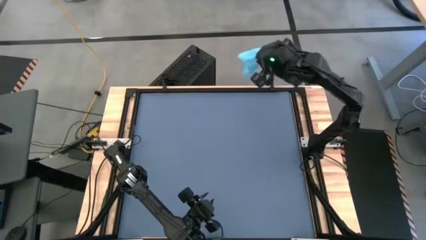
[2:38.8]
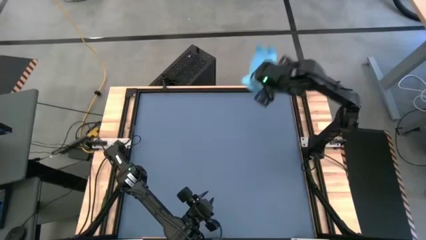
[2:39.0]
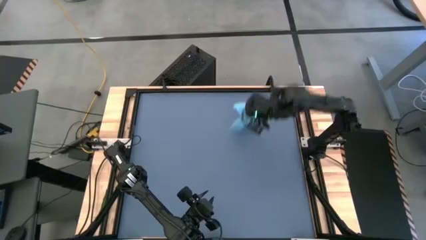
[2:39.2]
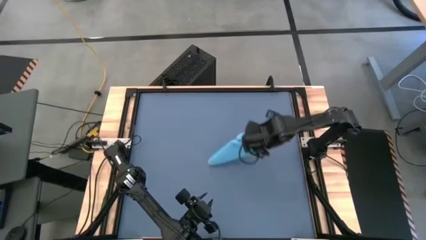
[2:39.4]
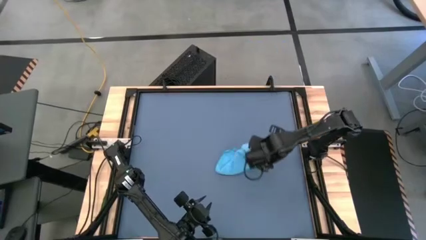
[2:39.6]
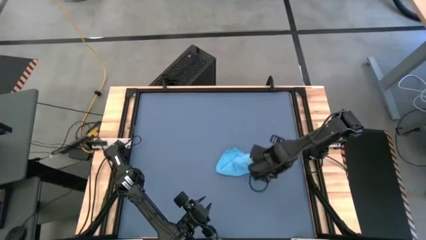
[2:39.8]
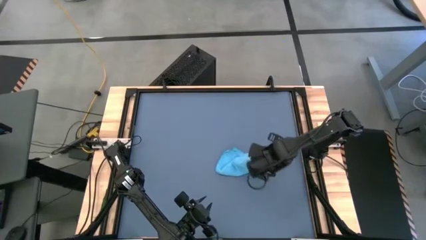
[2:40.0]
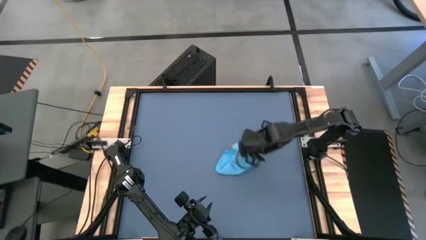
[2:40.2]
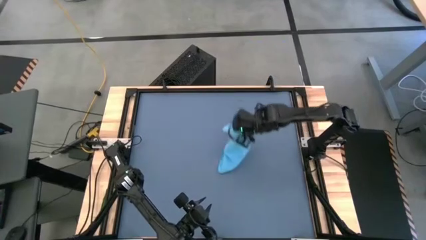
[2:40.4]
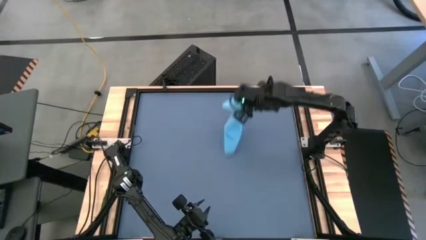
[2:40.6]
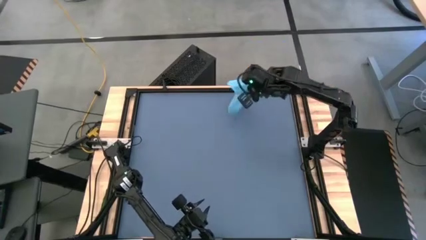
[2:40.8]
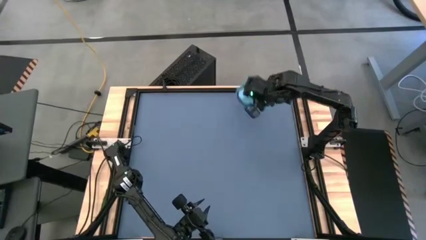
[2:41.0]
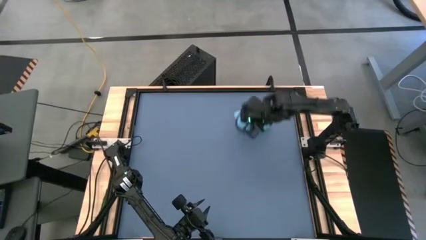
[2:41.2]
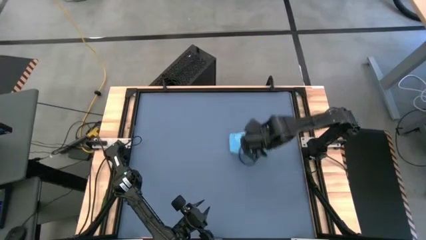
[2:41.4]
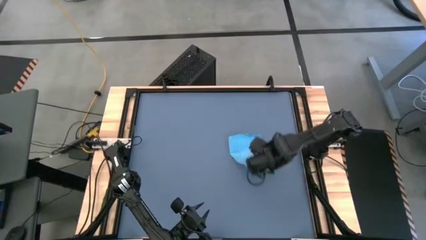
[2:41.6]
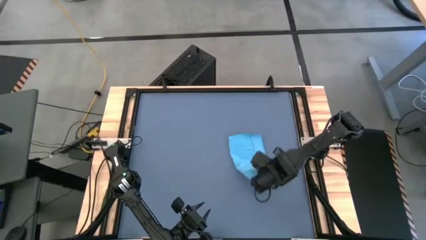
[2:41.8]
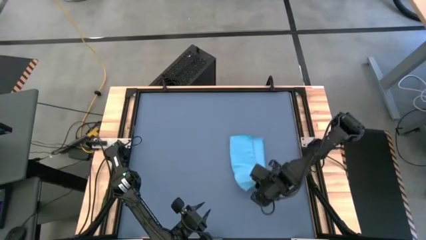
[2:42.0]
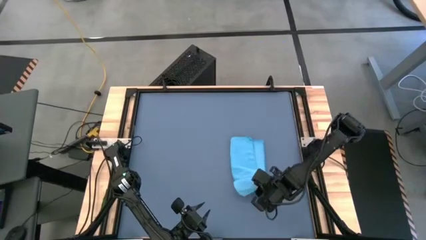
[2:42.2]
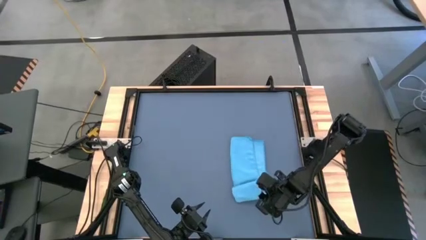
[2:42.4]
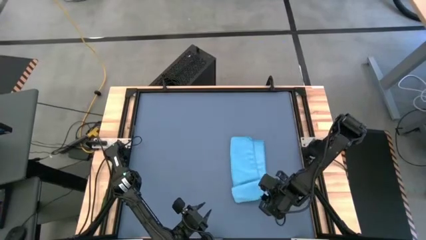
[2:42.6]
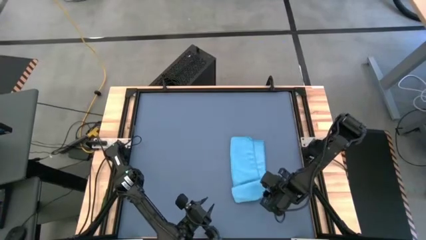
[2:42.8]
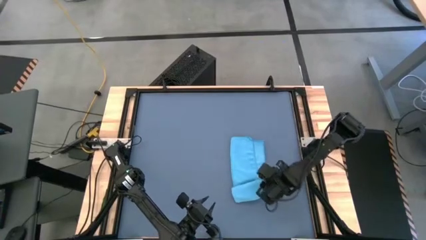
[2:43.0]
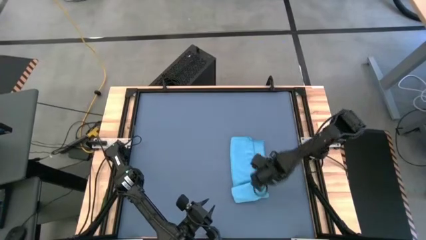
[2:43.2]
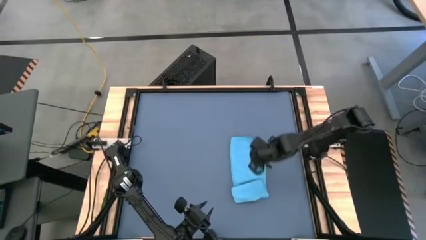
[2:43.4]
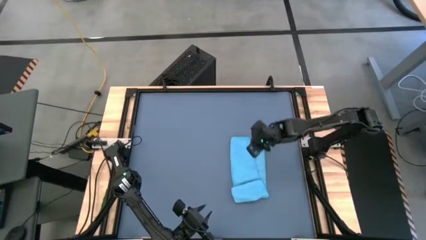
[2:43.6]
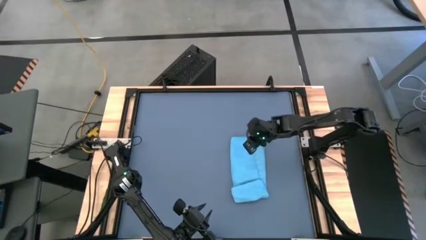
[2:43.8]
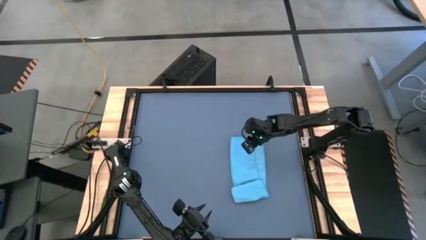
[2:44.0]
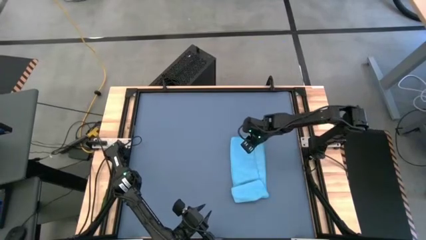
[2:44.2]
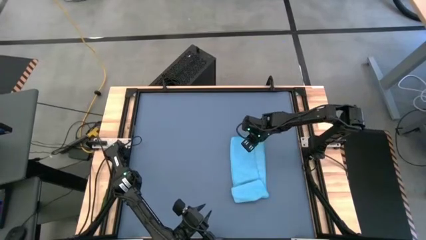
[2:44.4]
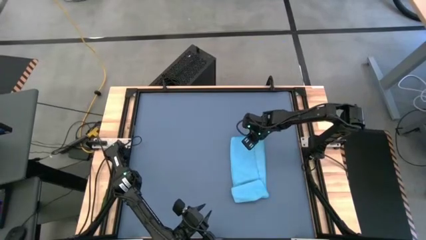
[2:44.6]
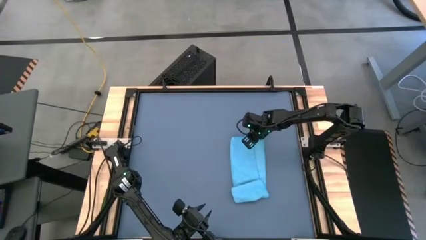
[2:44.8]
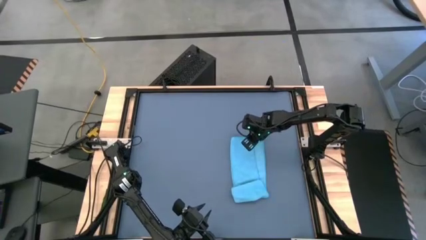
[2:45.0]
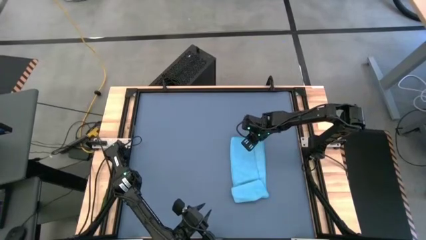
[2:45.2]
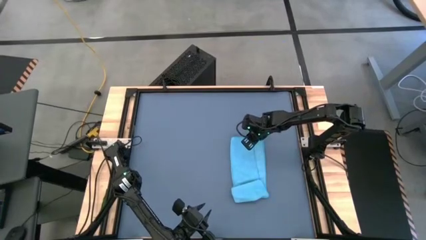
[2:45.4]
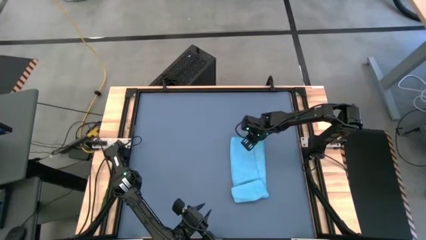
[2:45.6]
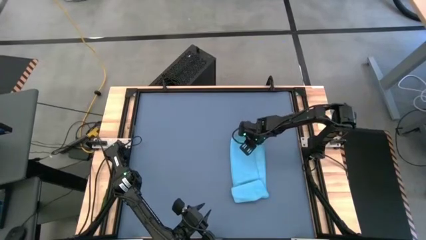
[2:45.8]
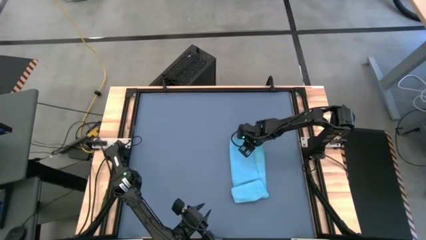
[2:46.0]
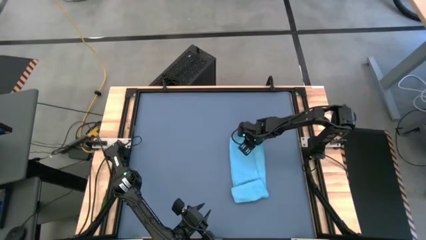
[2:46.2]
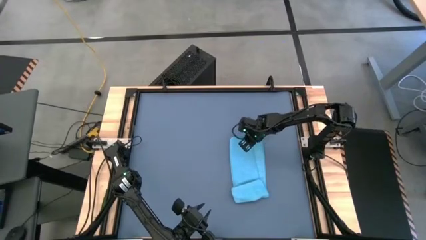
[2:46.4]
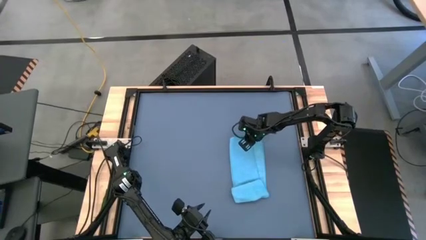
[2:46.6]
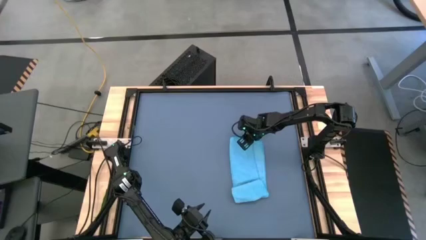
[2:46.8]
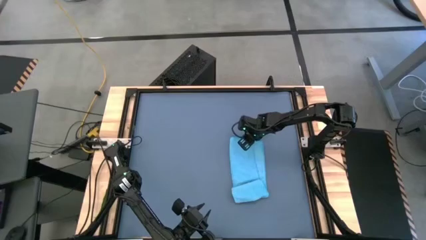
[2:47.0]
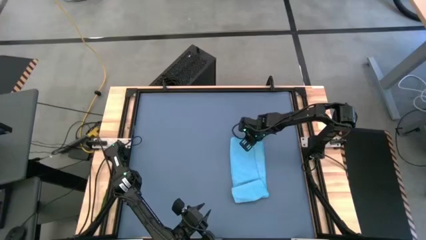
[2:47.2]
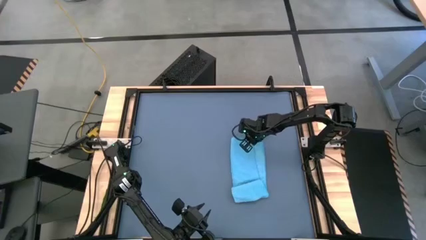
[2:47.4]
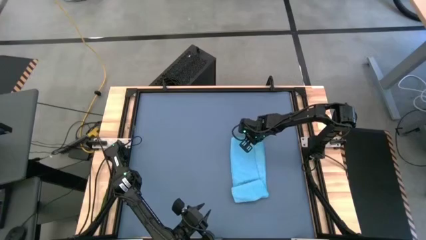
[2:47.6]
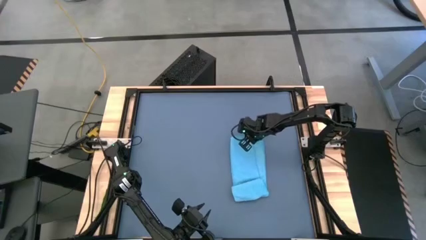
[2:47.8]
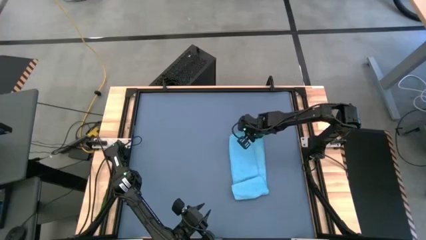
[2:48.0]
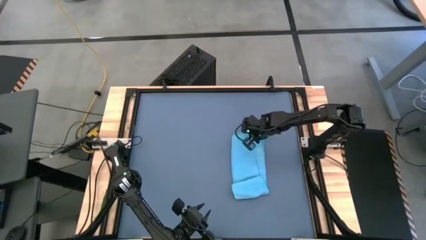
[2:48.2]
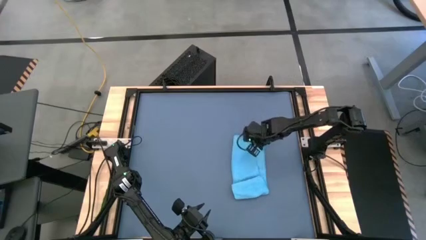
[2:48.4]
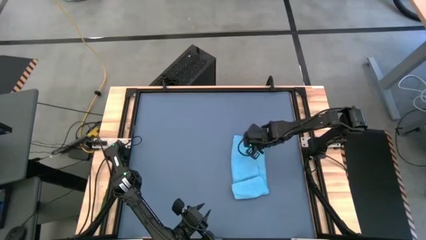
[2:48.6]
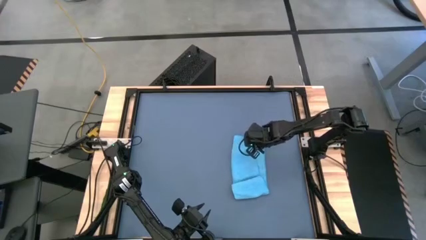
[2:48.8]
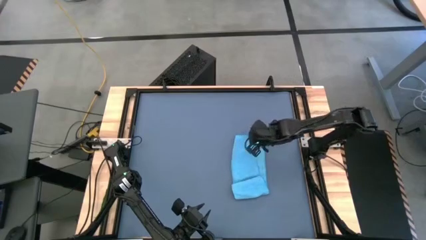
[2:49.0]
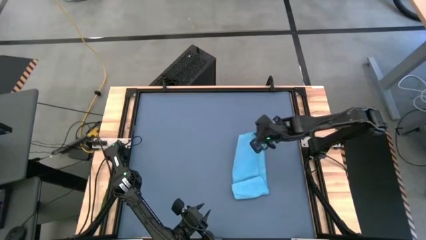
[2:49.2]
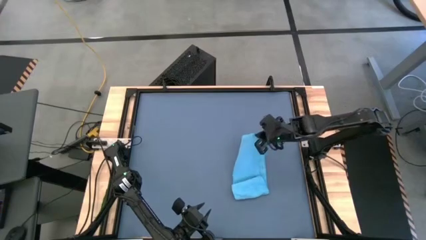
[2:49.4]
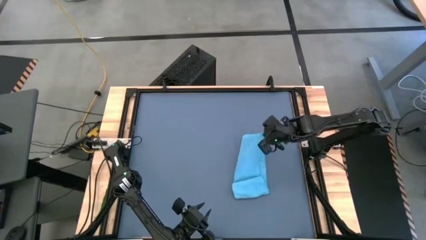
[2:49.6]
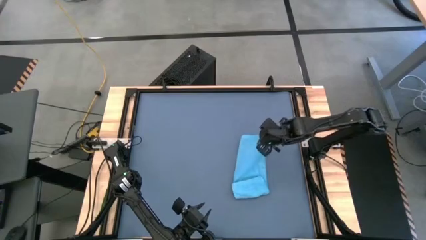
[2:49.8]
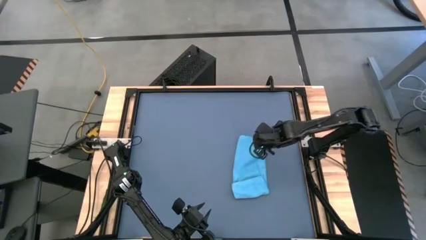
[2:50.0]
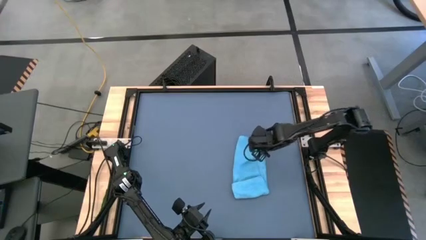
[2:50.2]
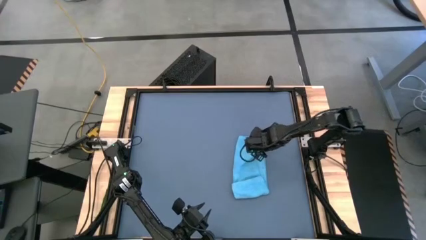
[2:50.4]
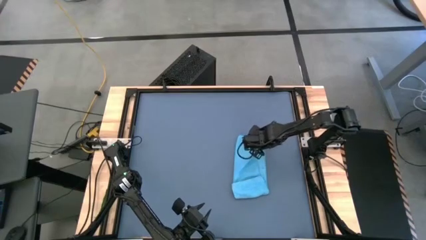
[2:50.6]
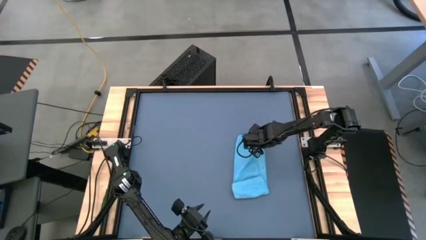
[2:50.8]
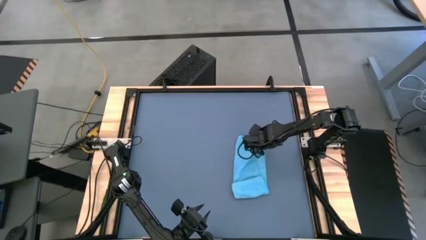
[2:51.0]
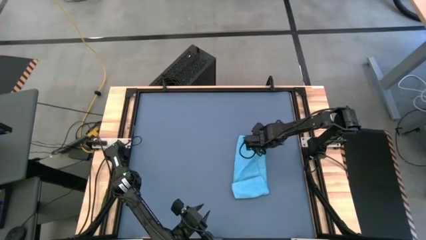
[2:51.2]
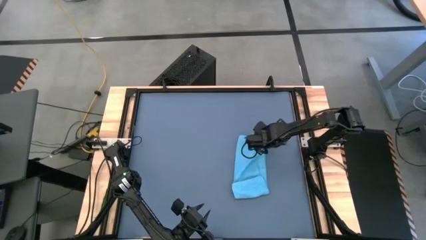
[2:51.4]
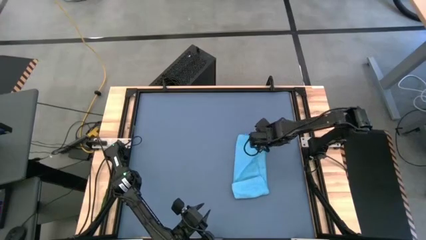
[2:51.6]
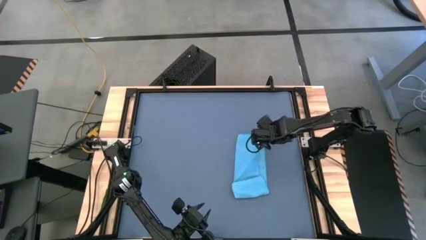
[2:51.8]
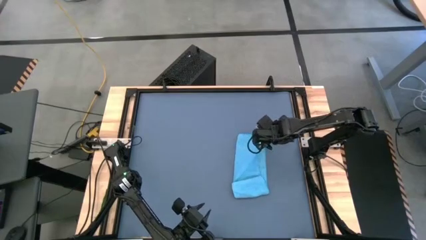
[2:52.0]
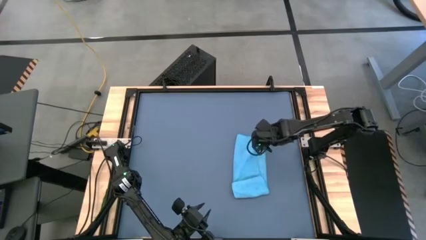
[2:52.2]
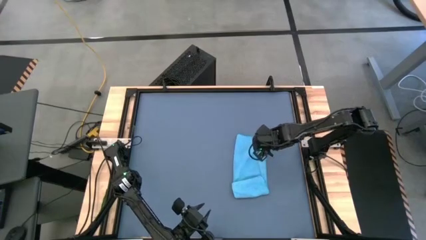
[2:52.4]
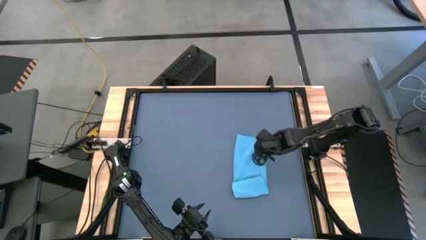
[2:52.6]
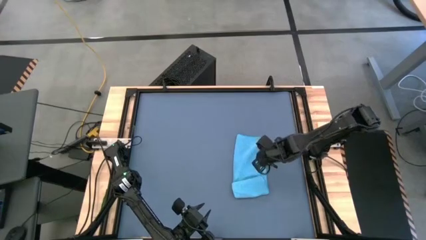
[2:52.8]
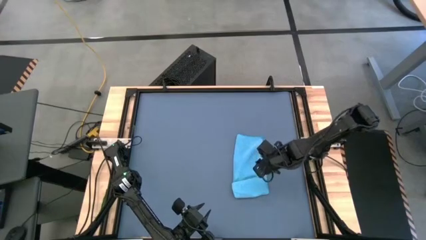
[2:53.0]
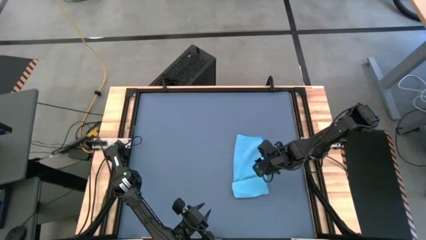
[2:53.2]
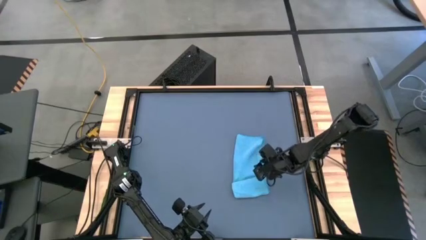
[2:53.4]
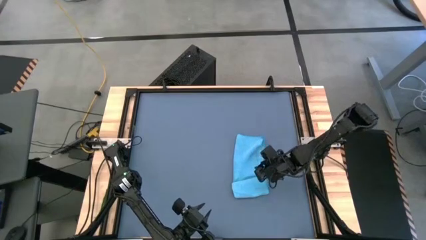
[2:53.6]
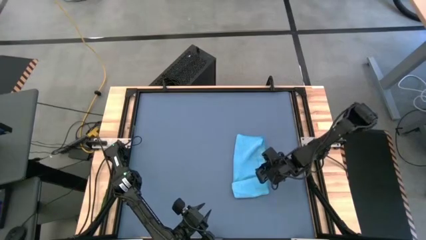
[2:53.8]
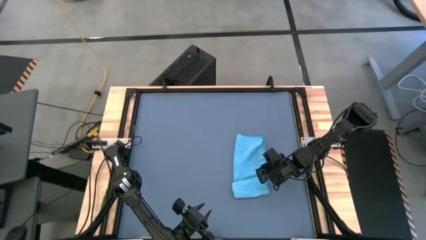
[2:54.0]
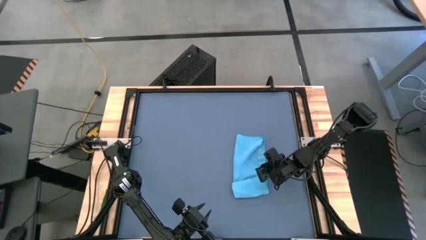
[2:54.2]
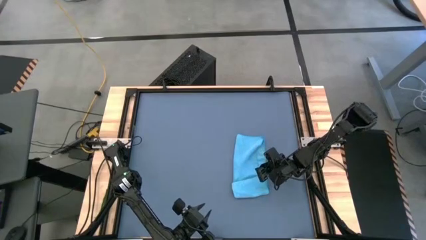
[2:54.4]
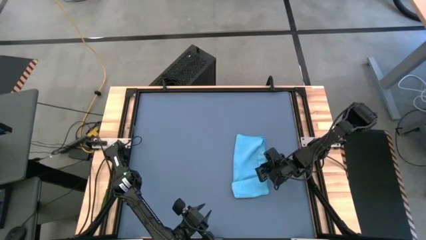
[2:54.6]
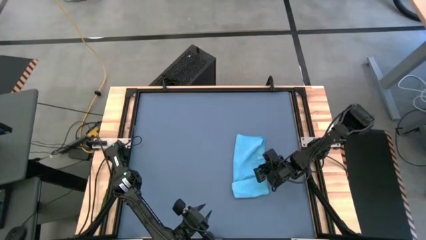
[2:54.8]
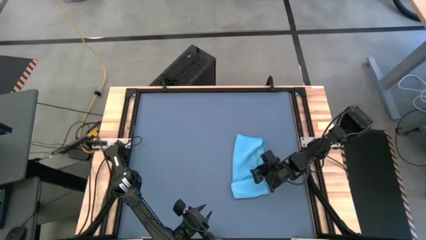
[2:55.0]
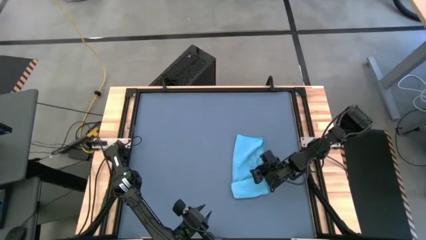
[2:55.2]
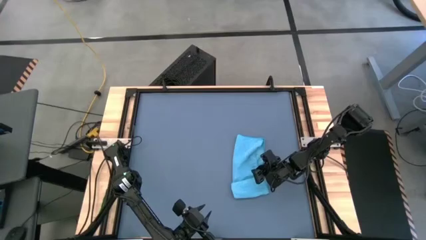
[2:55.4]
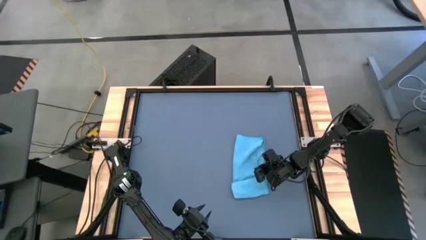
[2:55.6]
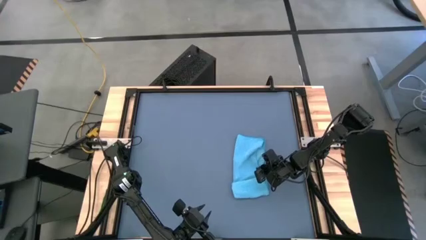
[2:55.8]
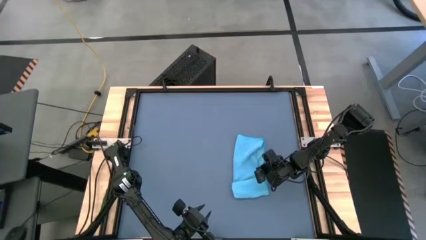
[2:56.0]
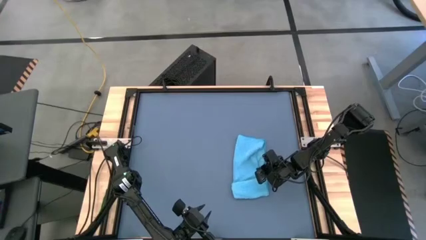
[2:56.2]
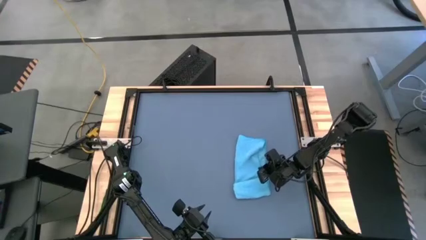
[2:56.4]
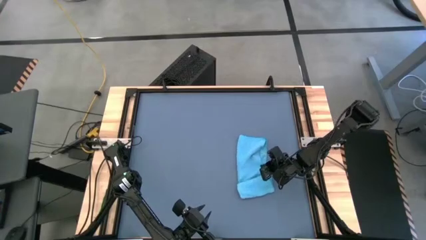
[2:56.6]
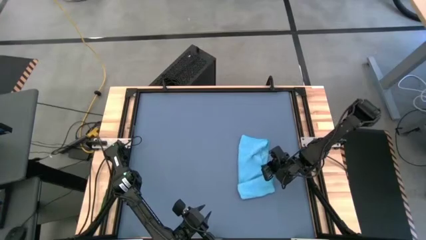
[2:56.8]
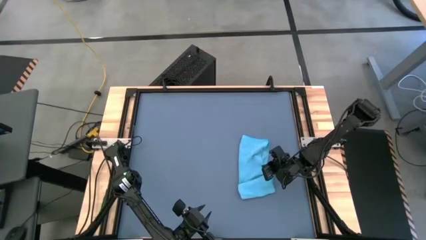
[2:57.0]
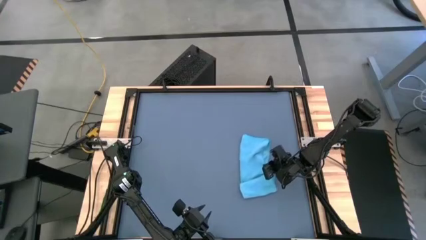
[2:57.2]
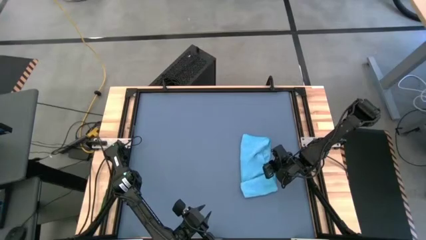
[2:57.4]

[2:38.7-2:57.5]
Task: Roll towel
Roll the blue microfiber towel
